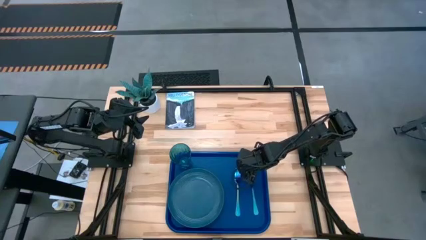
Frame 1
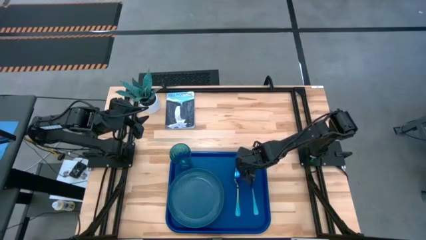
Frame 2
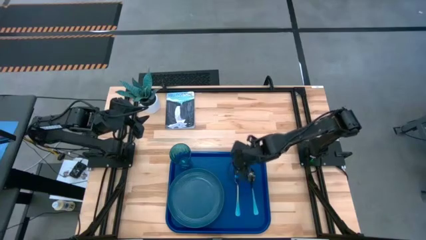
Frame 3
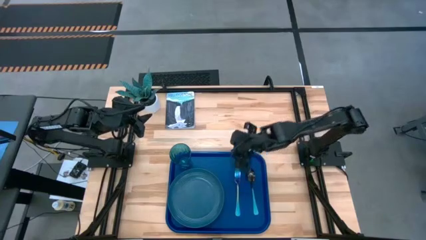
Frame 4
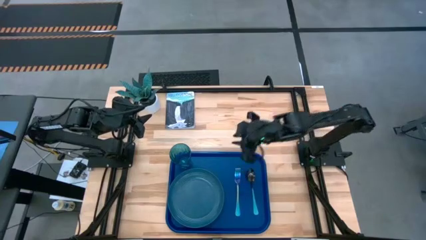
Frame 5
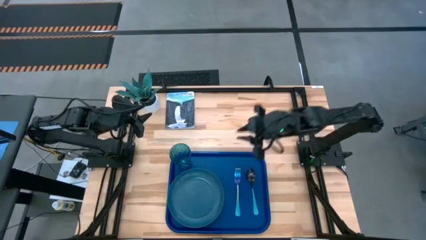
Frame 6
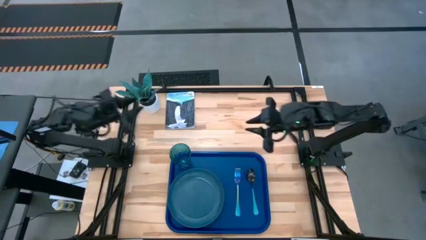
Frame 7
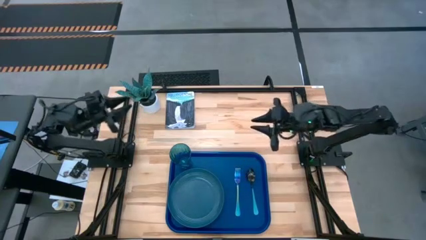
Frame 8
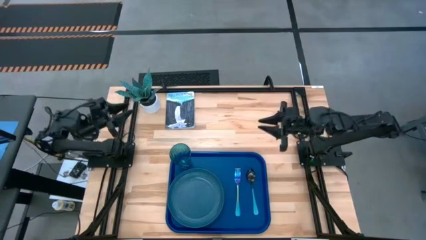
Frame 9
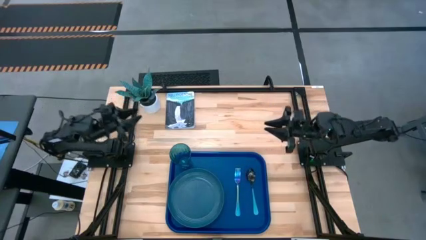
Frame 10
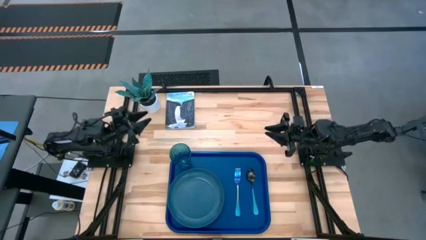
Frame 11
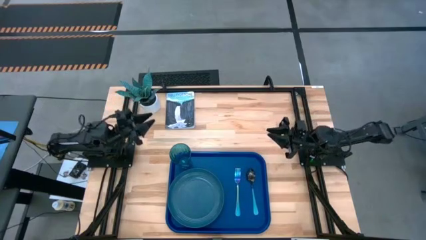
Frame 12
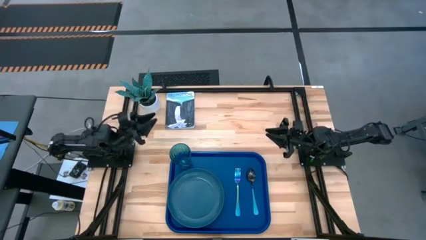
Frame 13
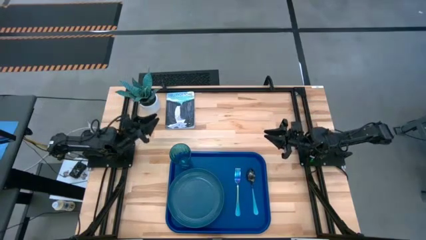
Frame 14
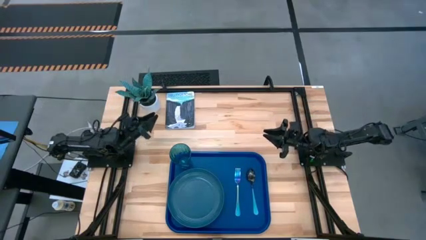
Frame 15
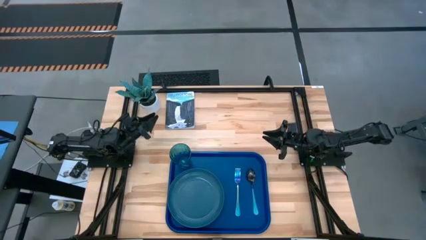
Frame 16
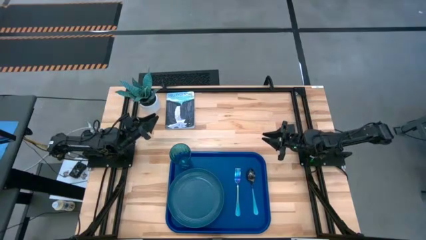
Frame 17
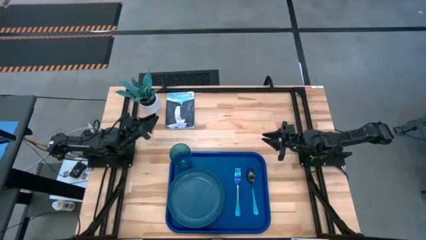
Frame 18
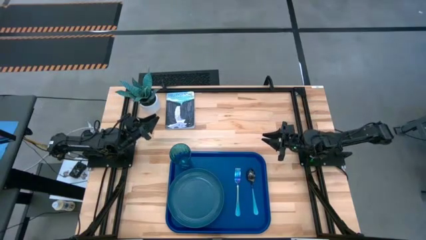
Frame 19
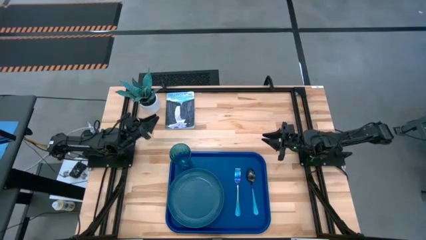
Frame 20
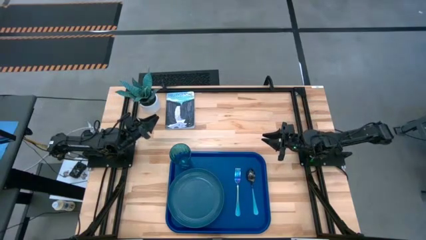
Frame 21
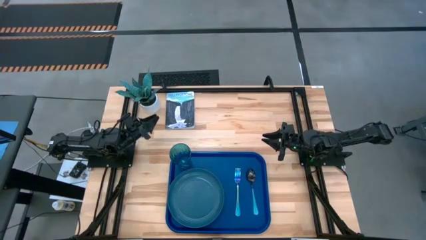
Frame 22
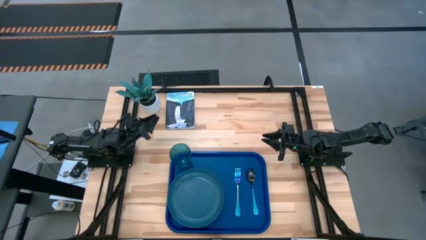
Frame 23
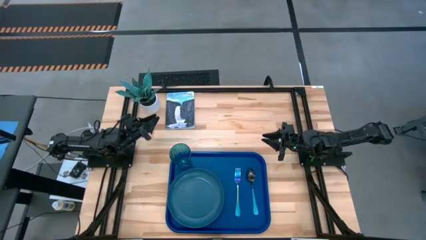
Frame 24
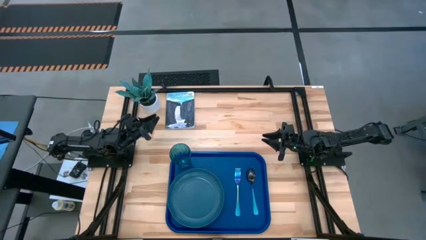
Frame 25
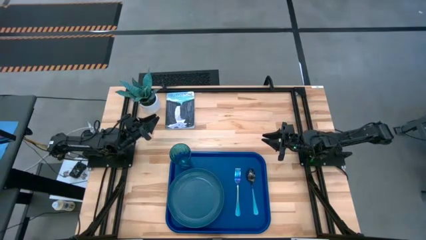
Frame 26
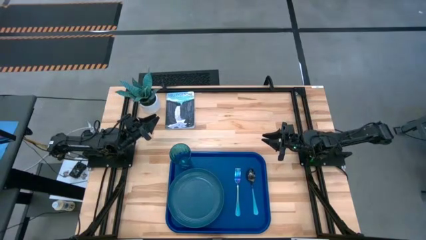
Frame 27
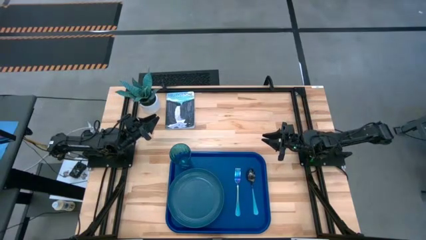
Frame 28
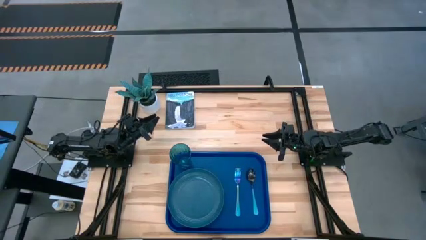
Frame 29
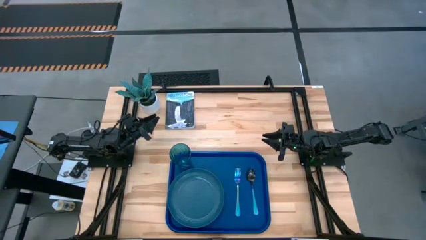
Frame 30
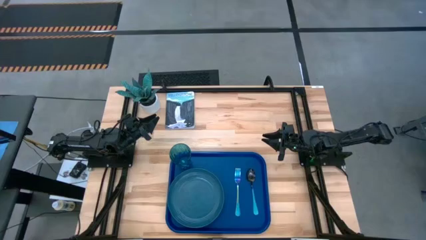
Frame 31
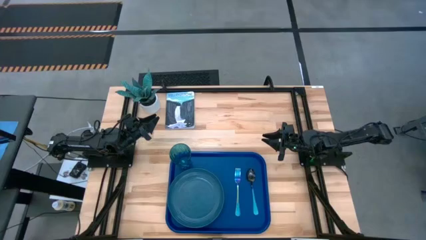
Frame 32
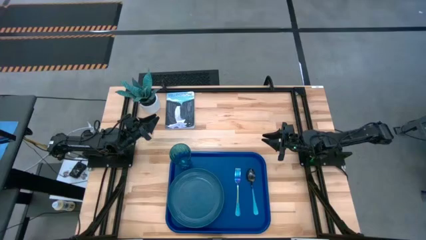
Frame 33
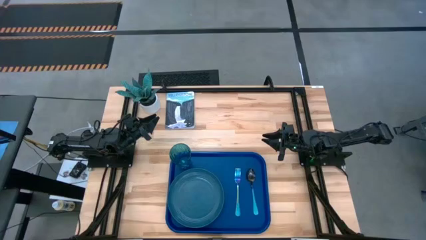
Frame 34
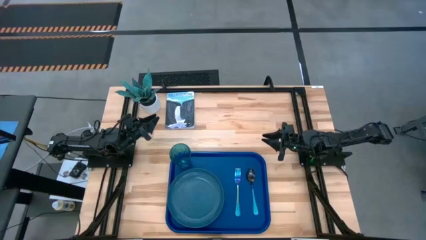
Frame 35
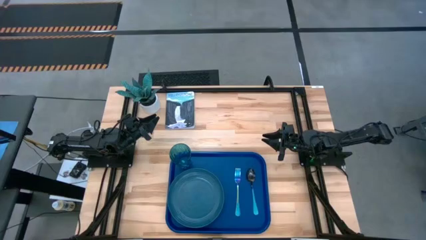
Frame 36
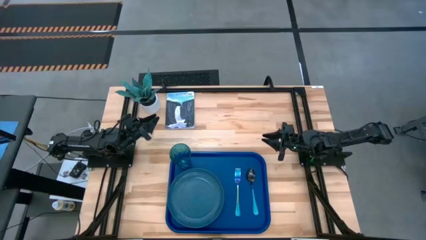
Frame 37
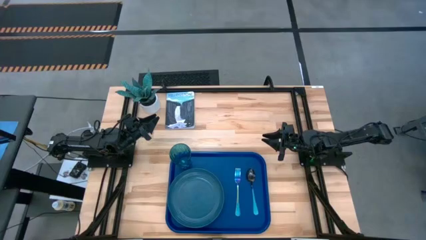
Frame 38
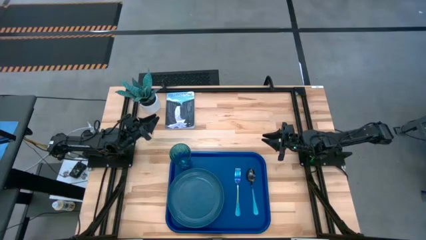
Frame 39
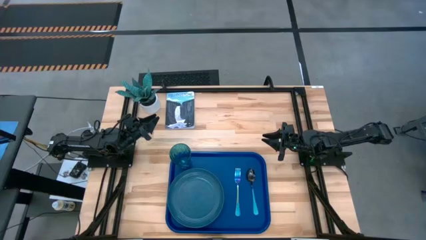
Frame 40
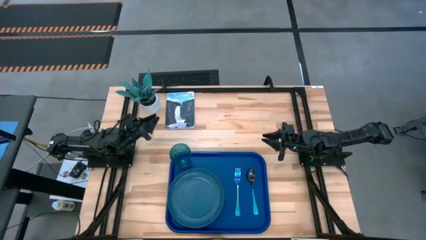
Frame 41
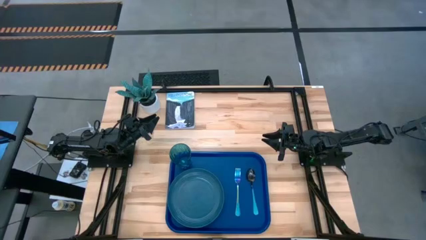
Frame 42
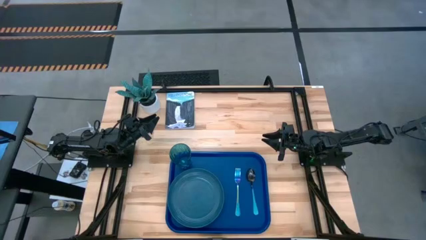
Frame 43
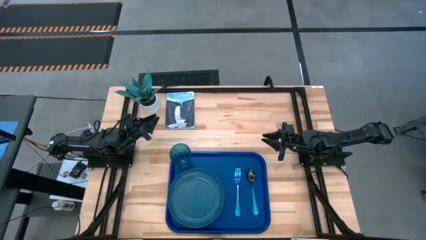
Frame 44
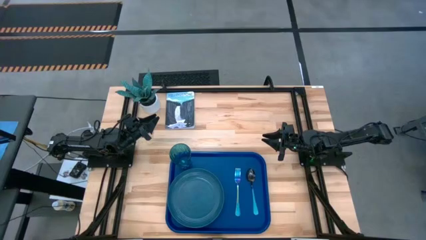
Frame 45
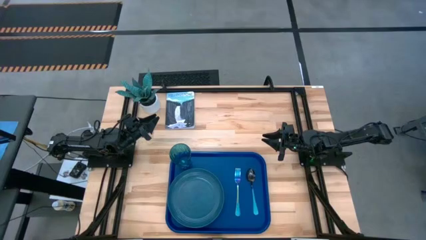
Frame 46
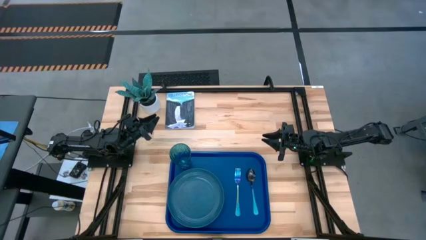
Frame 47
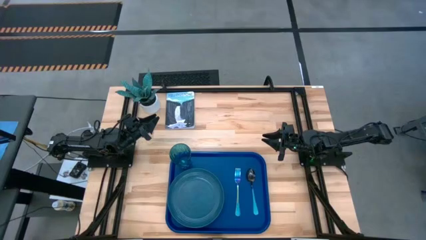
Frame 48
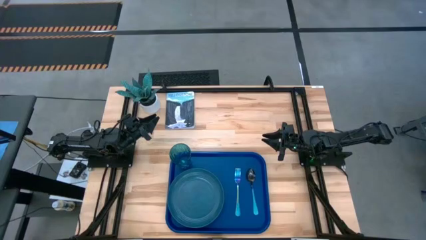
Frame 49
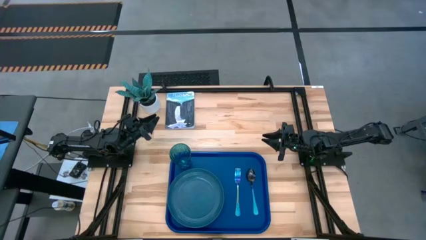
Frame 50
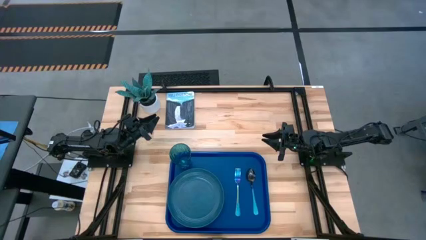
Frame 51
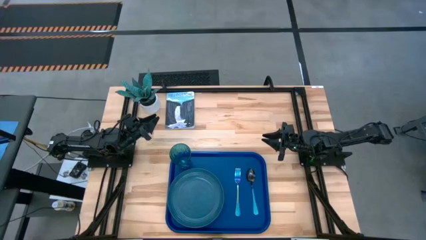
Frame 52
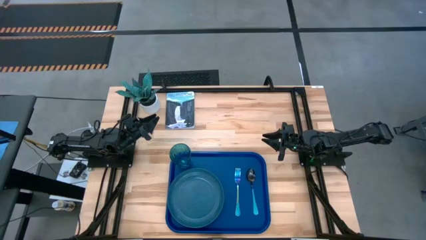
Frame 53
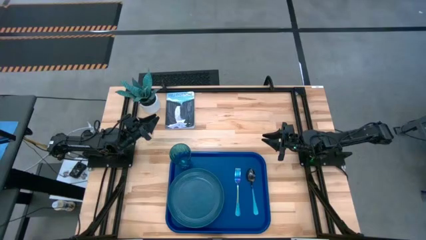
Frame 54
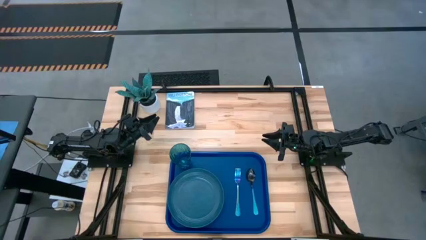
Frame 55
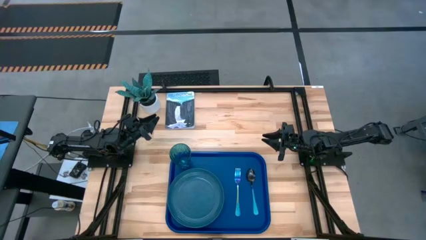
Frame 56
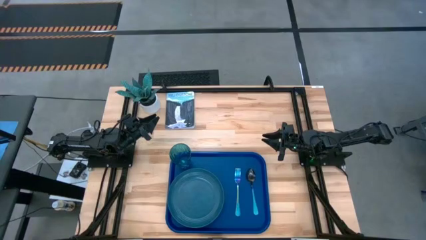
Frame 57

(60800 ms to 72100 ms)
Task: Pick and place plate/cup/fork/spoon on tray
Return to Home Position
